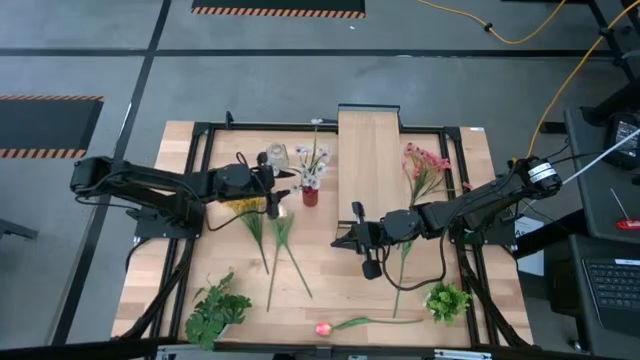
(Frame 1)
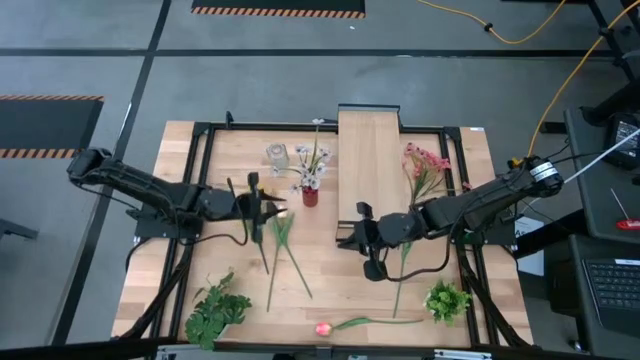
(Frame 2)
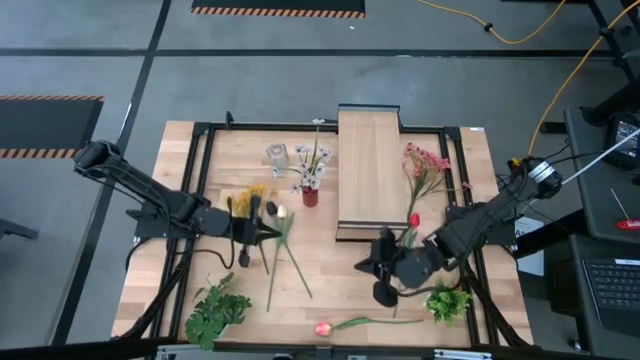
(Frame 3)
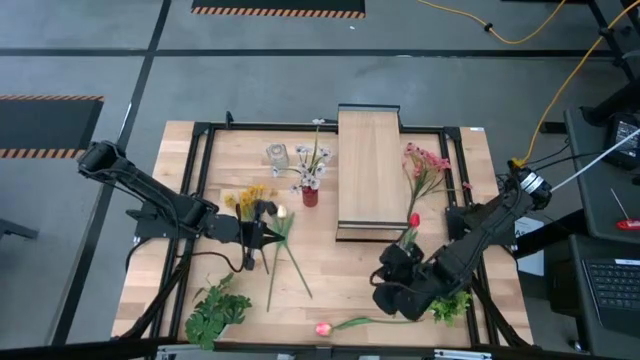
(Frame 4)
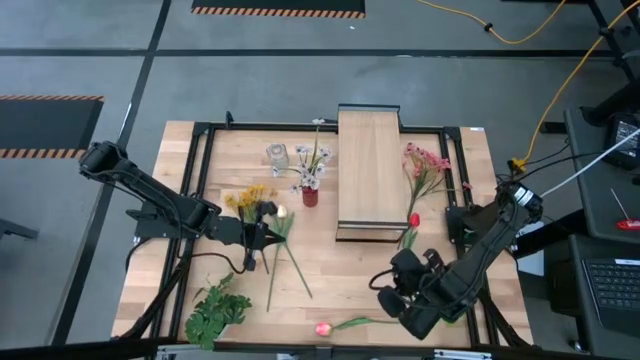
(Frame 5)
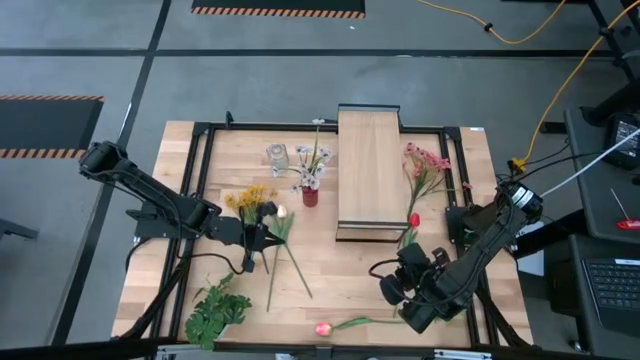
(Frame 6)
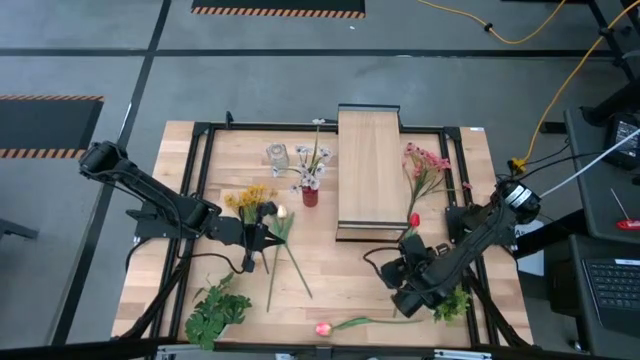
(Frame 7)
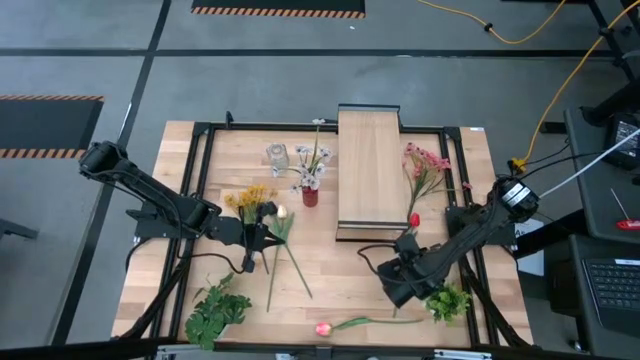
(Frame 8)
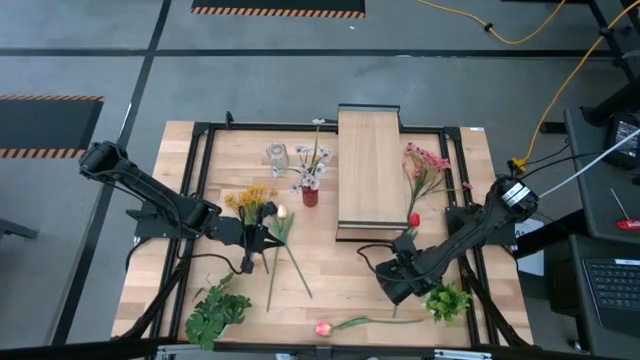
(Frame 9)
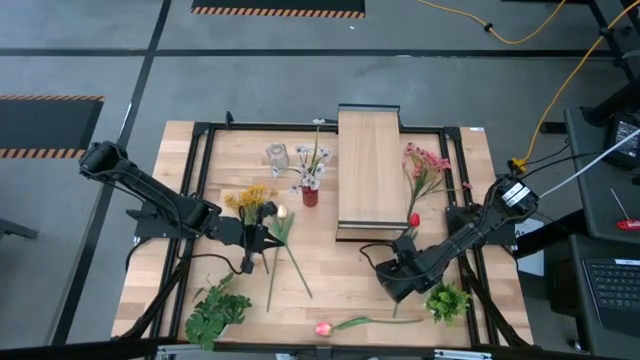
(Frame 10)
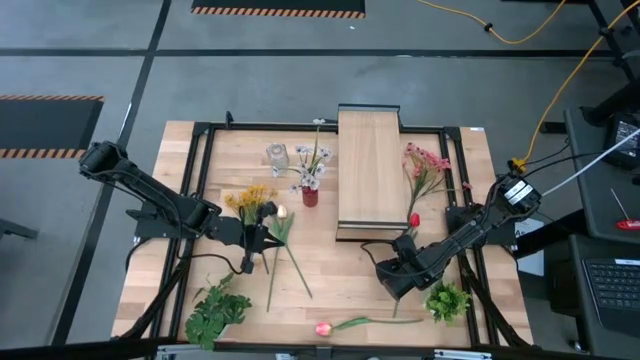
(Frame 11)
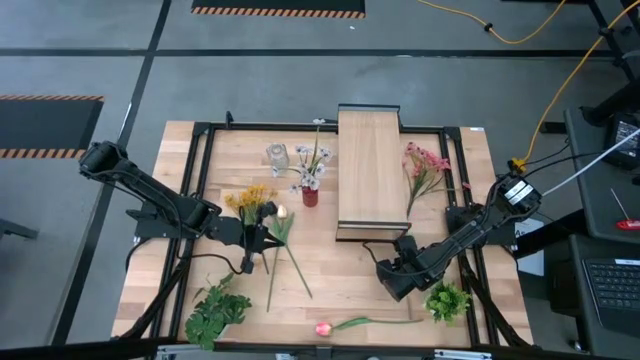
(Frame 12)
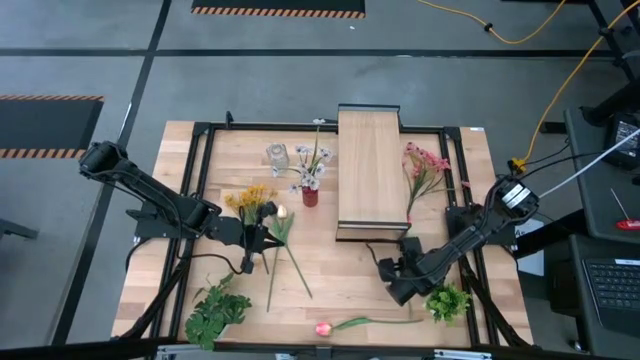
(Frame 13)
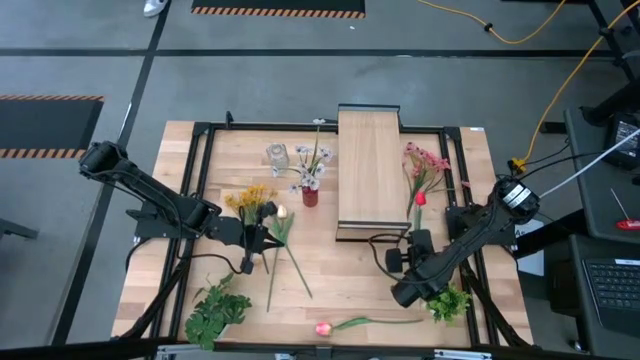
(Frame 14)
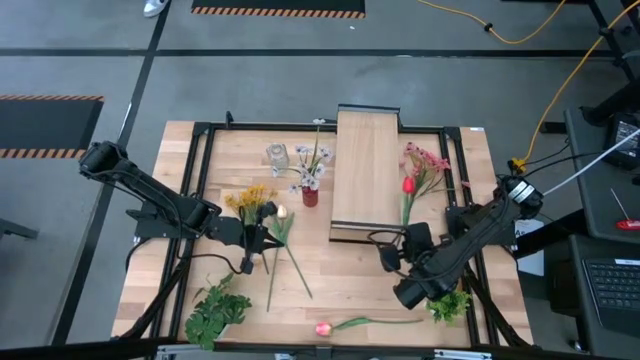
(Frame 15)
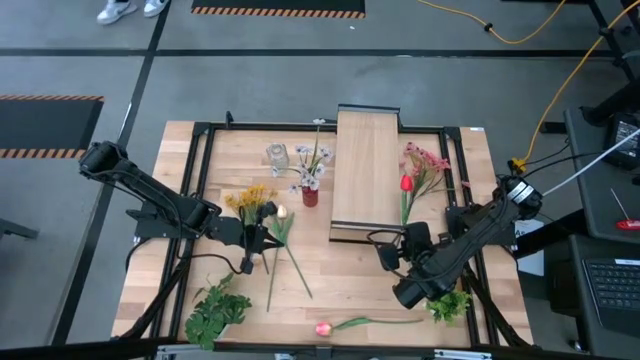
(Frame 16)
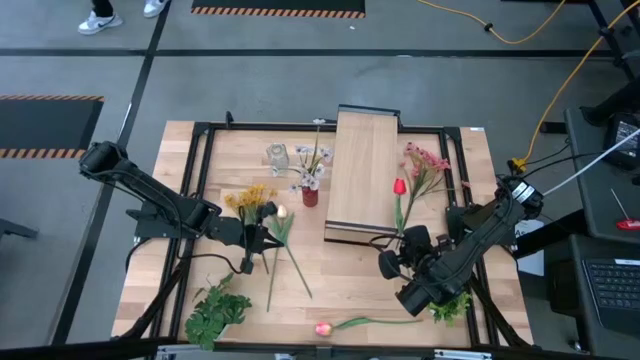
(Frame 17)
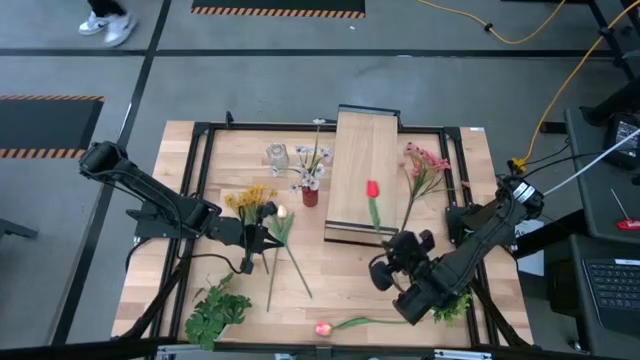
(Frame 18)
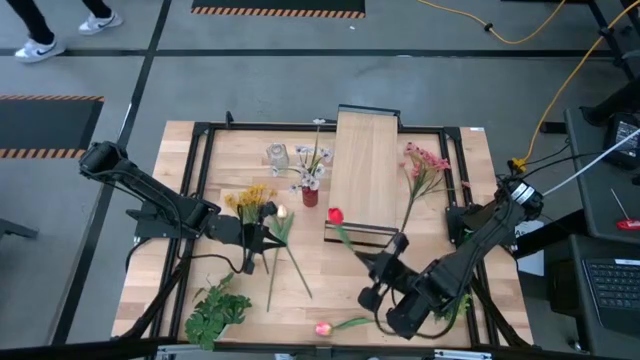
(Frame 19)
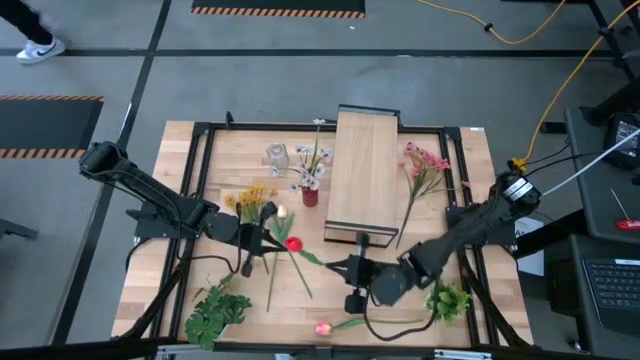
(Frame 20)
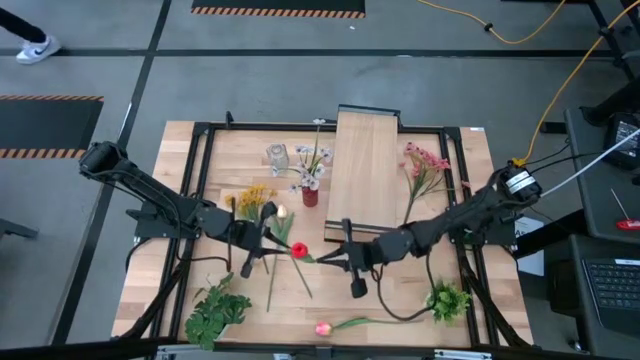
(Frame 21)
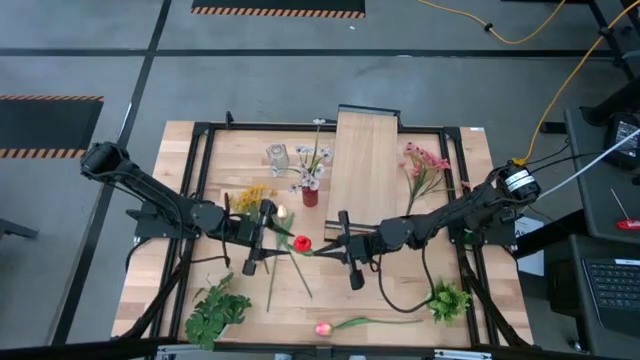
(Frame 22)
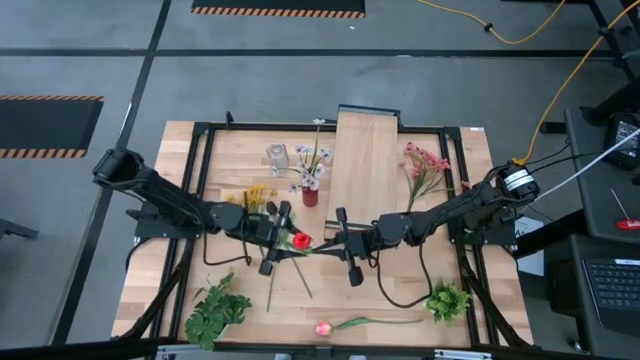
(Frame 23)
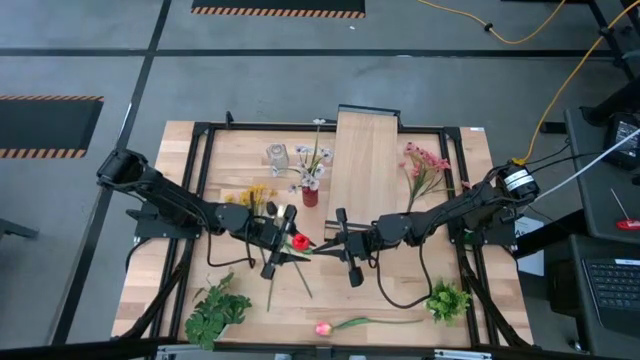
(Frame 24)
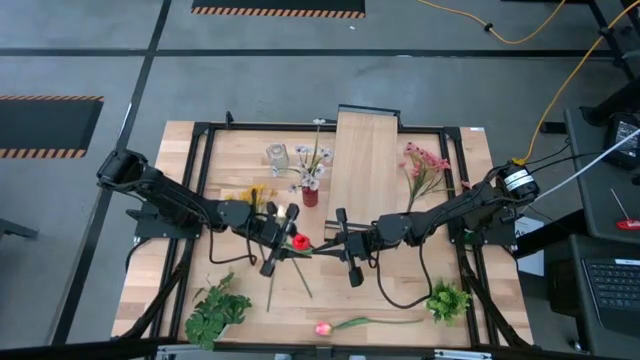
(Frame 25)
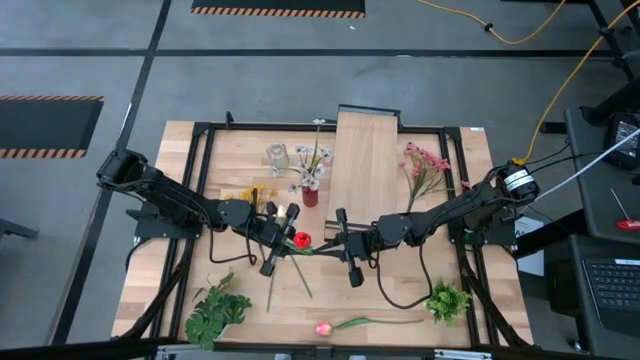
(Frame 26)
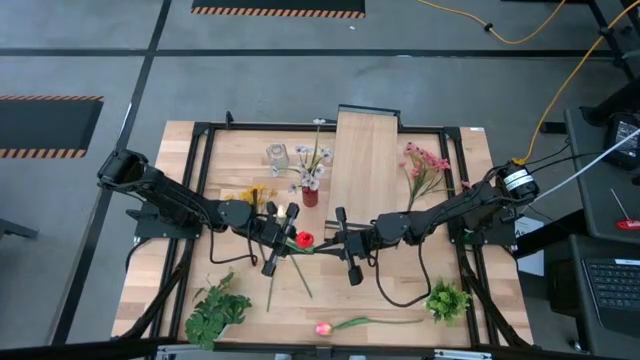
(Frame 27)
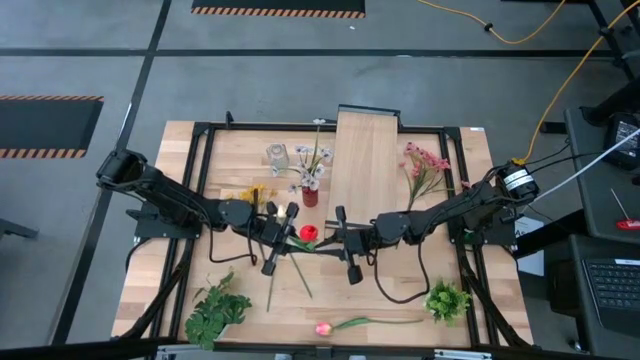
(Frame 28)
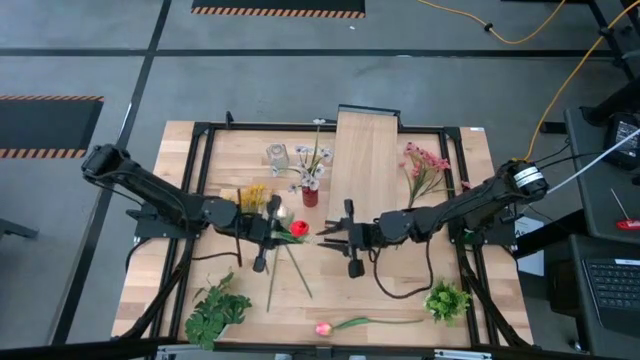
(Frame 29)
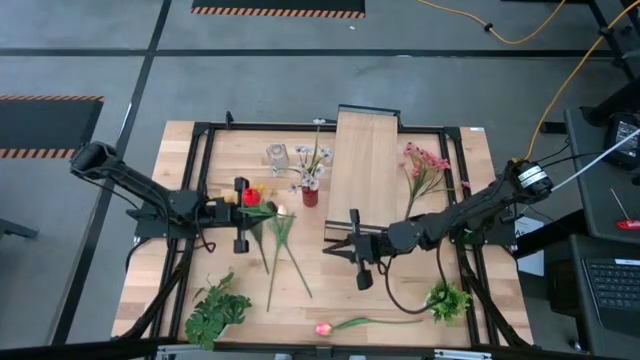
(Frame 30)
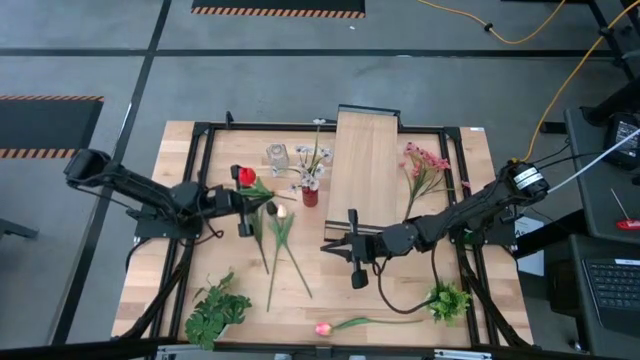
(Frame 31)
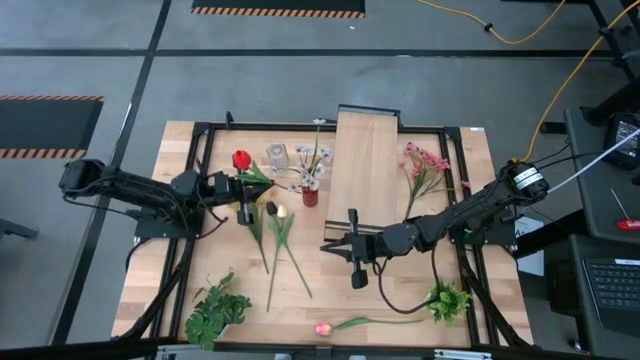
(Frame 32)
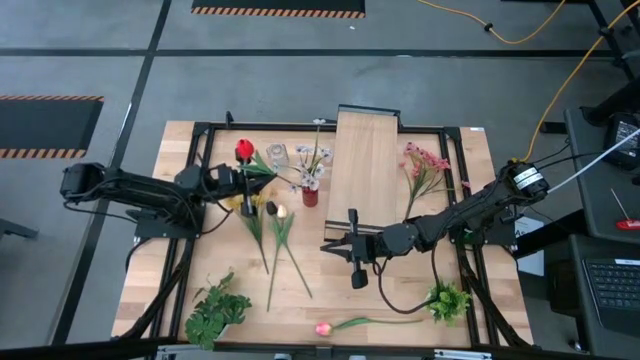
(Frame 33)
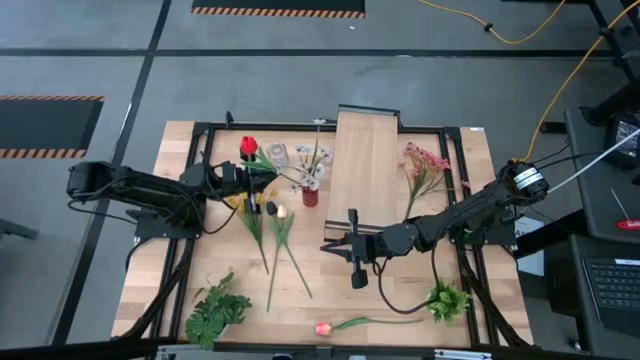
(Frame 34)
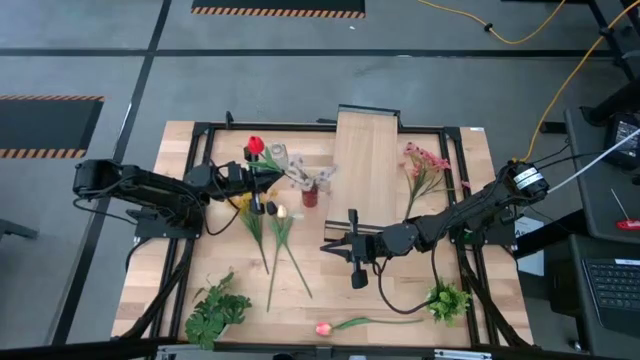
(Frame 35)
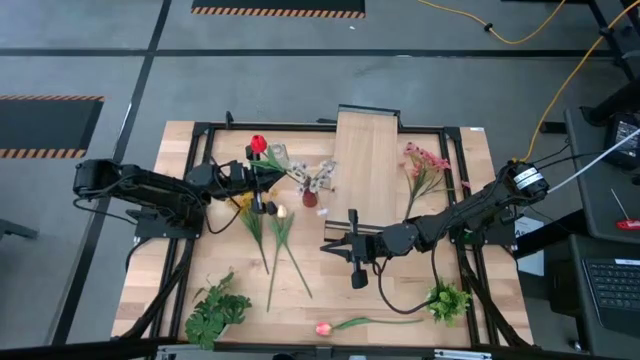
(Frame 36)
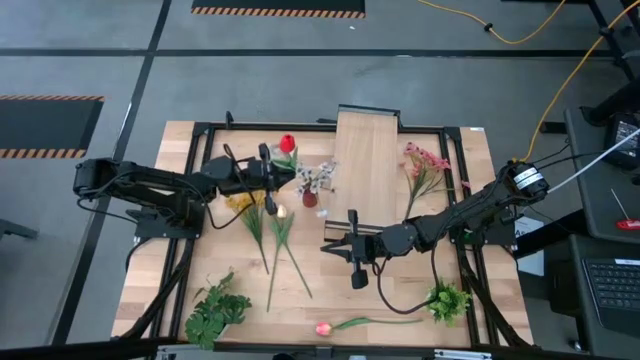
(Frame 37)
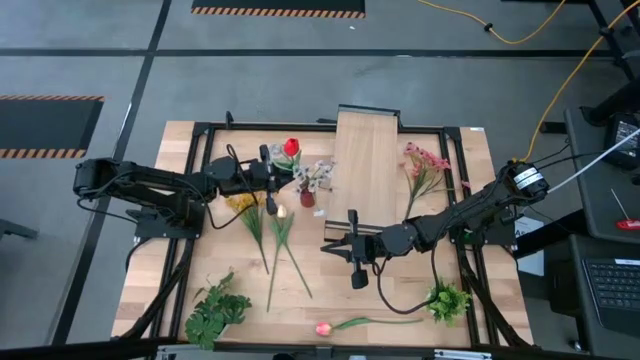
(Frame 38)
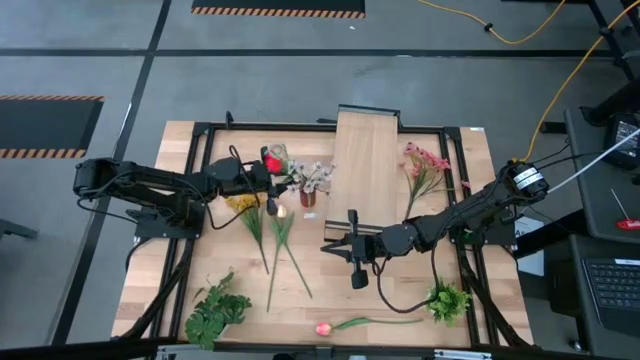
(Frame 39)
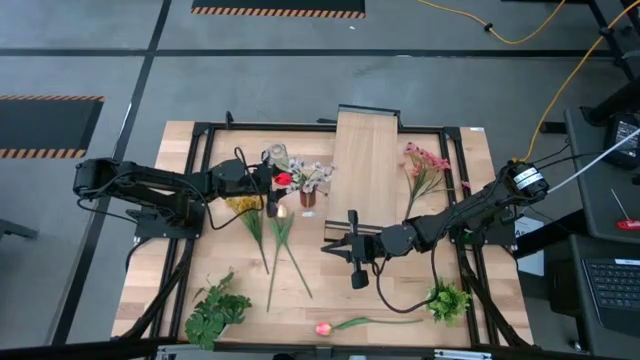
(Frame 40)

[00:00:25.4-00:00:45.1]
Task: Pick and place flowers into a vace then onto a shelf
Put the red tulip into the red vase
